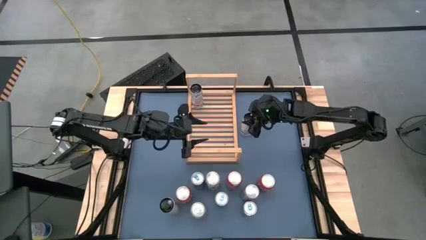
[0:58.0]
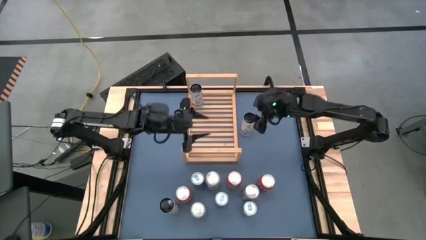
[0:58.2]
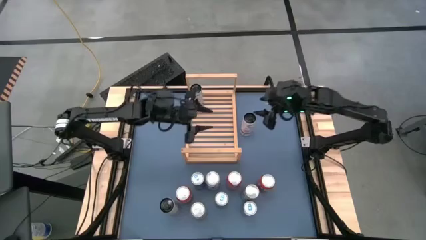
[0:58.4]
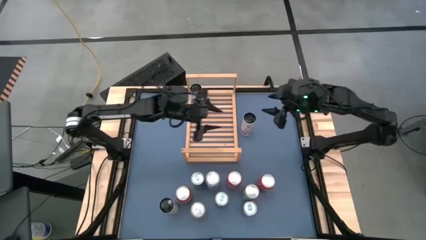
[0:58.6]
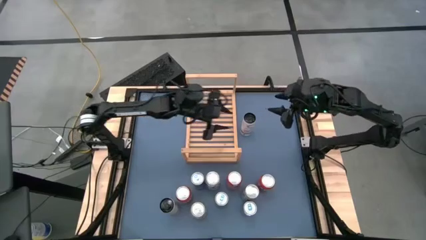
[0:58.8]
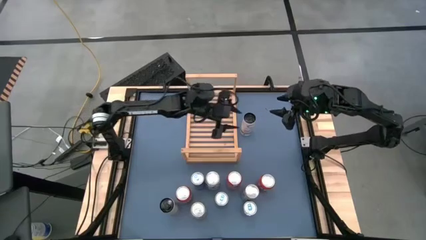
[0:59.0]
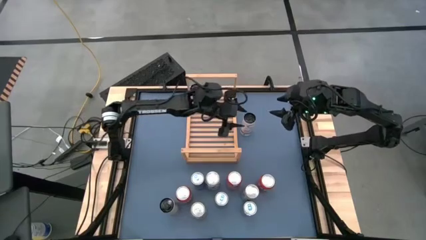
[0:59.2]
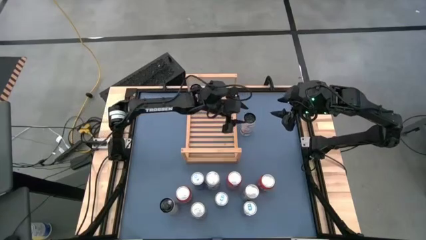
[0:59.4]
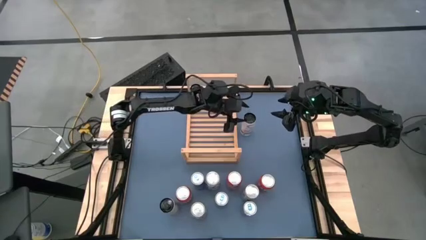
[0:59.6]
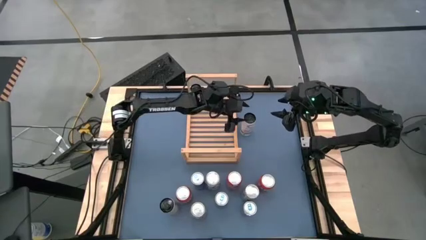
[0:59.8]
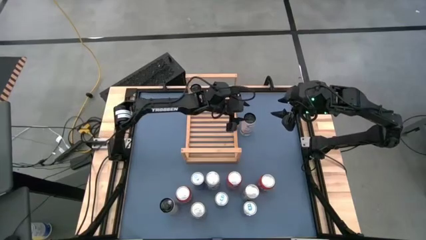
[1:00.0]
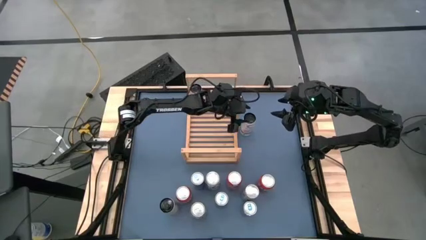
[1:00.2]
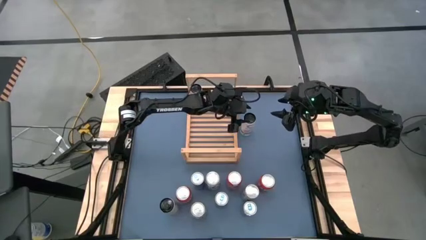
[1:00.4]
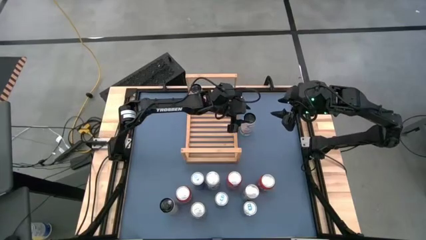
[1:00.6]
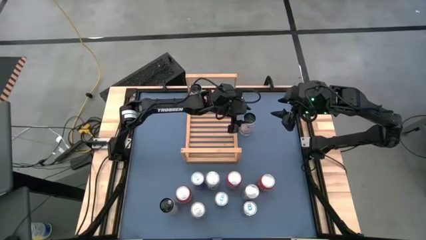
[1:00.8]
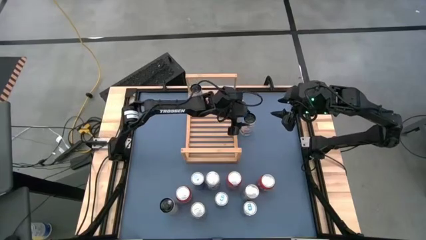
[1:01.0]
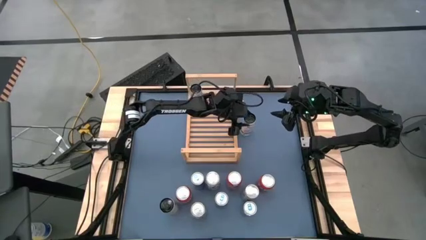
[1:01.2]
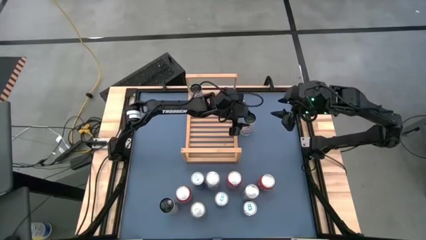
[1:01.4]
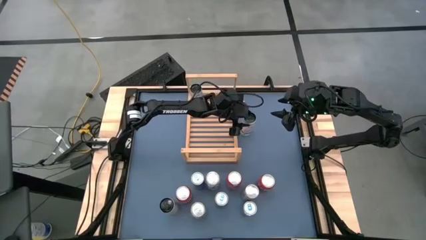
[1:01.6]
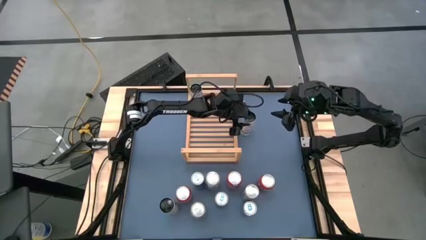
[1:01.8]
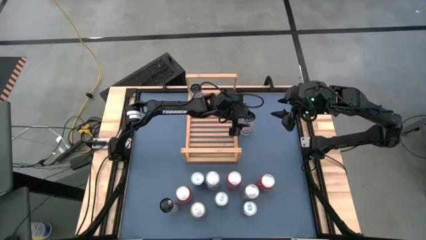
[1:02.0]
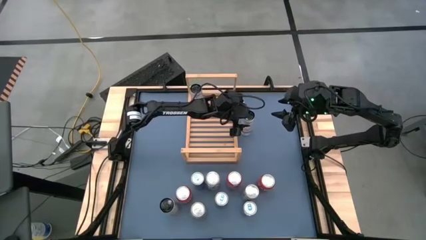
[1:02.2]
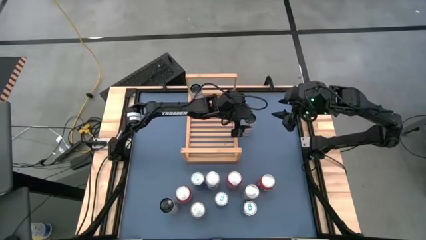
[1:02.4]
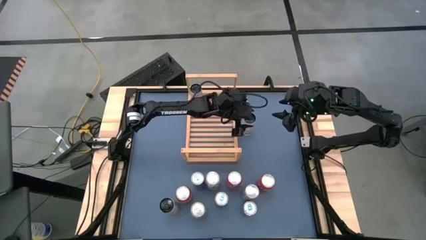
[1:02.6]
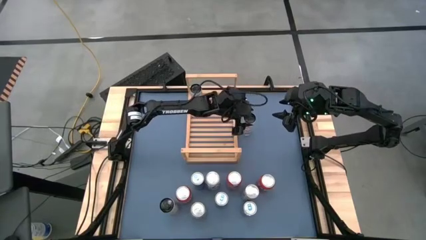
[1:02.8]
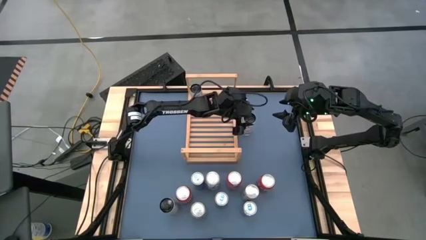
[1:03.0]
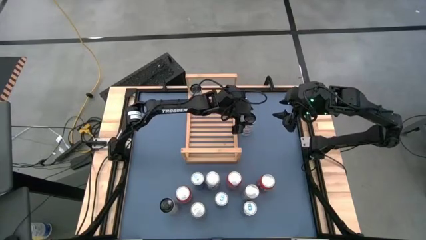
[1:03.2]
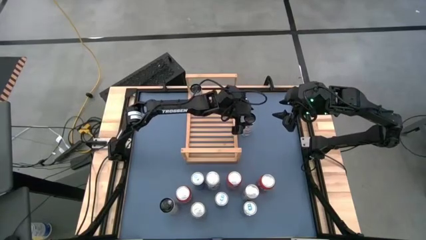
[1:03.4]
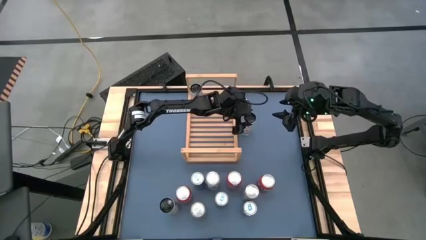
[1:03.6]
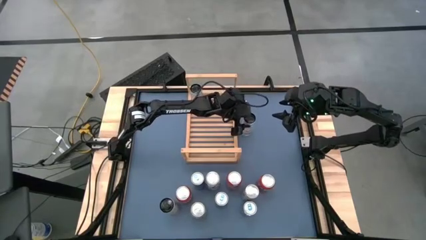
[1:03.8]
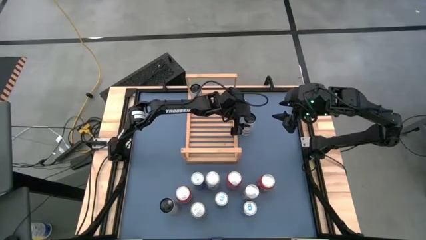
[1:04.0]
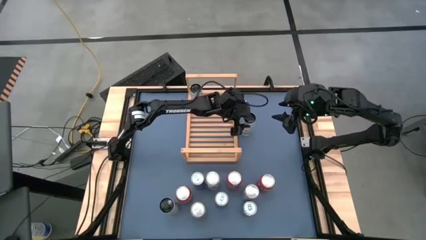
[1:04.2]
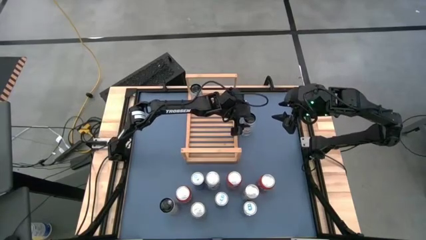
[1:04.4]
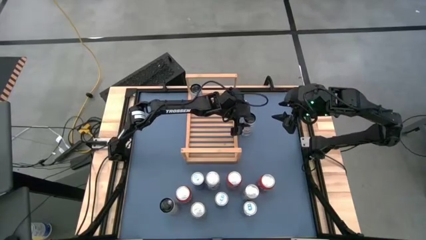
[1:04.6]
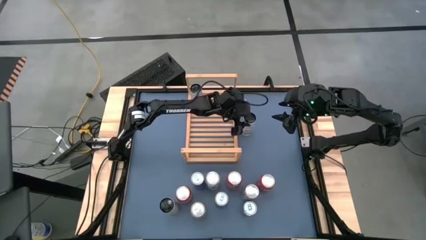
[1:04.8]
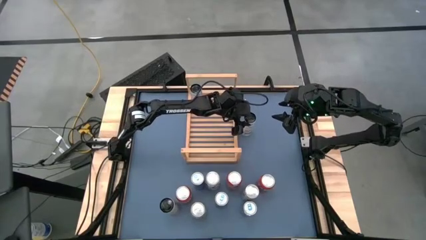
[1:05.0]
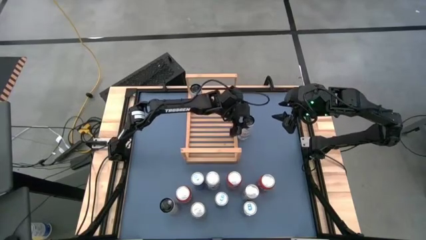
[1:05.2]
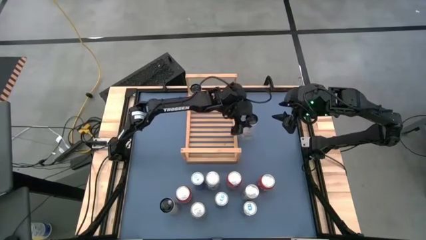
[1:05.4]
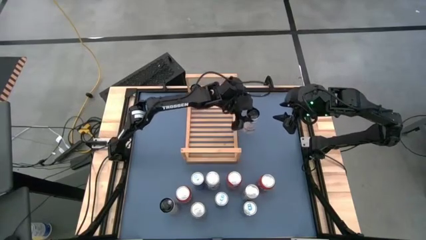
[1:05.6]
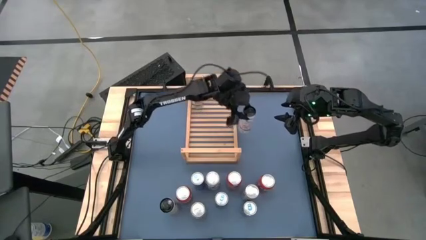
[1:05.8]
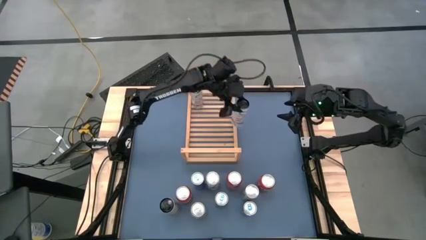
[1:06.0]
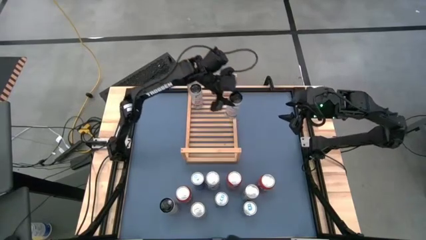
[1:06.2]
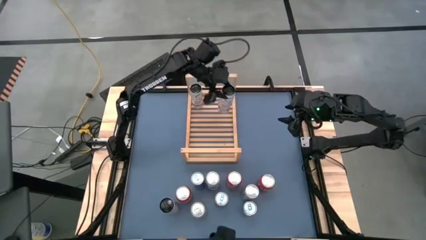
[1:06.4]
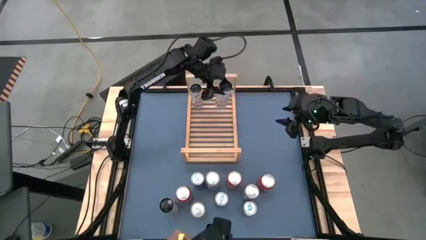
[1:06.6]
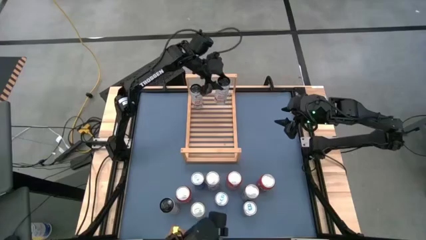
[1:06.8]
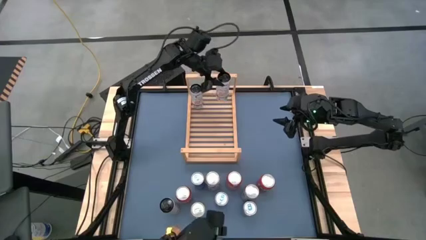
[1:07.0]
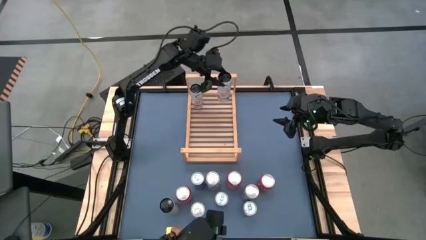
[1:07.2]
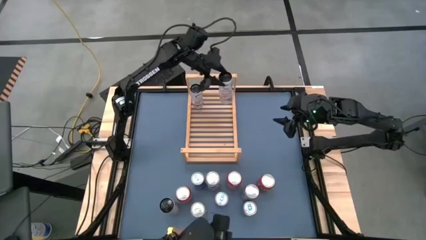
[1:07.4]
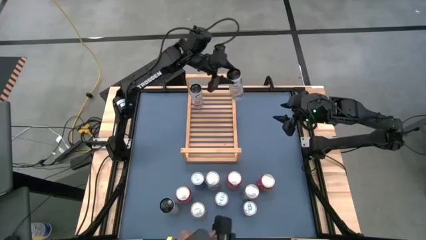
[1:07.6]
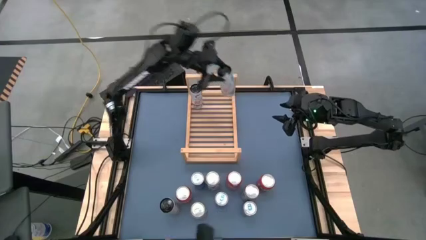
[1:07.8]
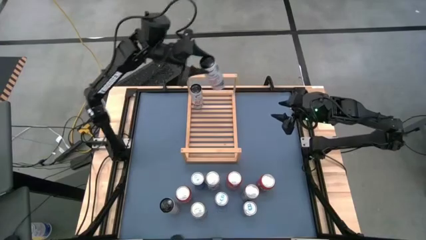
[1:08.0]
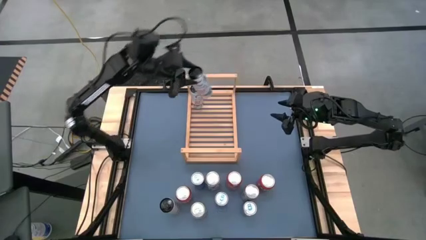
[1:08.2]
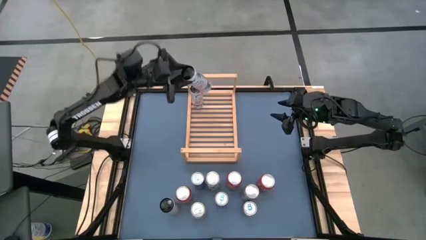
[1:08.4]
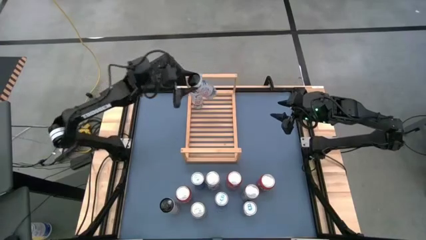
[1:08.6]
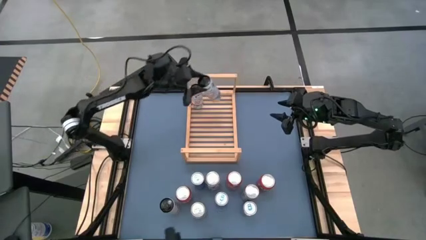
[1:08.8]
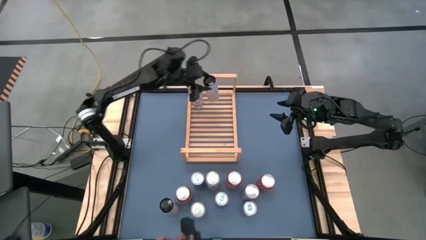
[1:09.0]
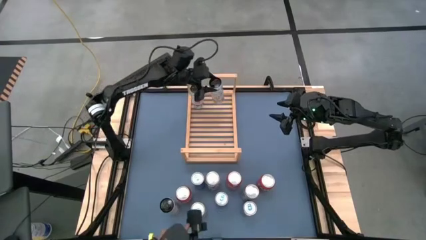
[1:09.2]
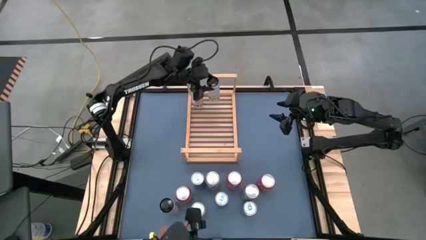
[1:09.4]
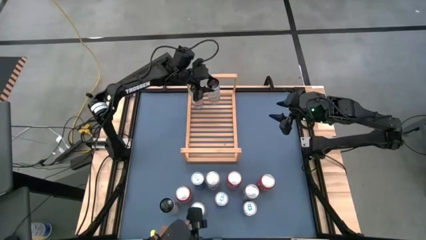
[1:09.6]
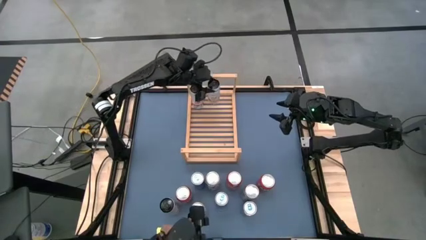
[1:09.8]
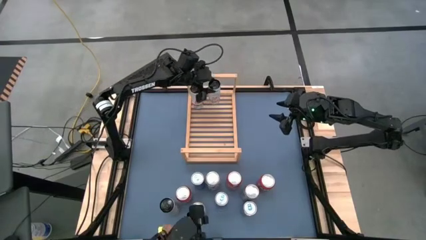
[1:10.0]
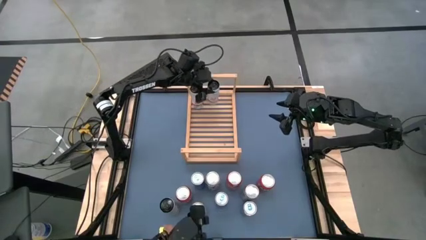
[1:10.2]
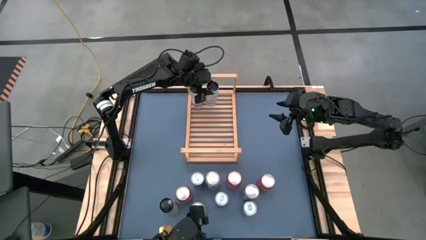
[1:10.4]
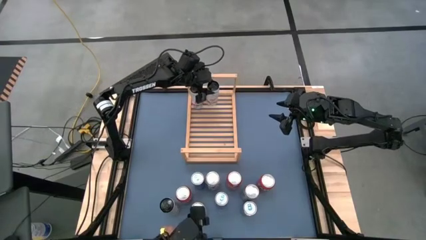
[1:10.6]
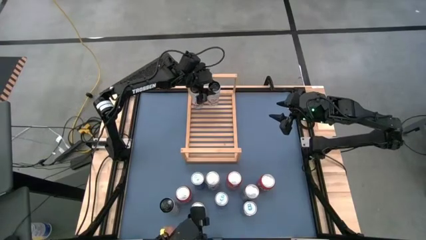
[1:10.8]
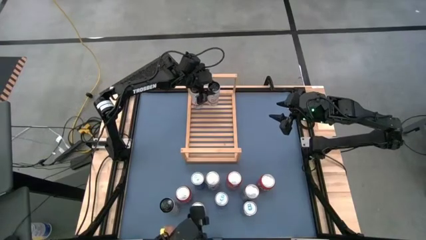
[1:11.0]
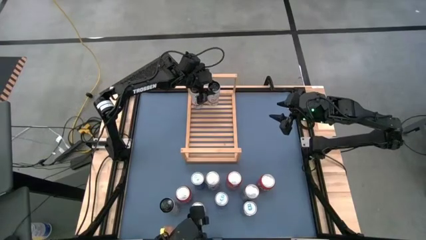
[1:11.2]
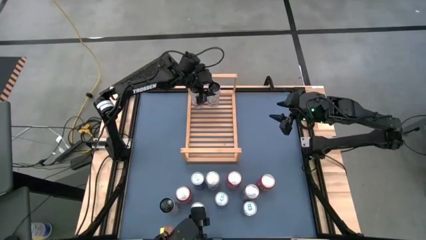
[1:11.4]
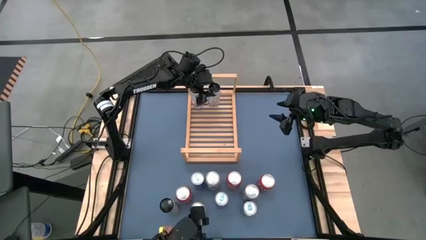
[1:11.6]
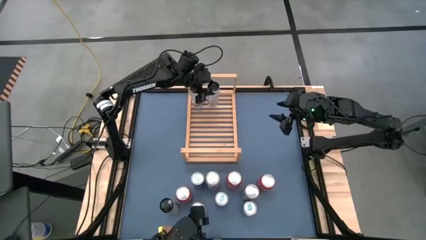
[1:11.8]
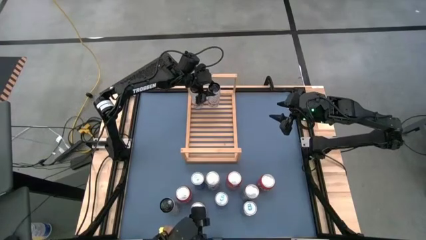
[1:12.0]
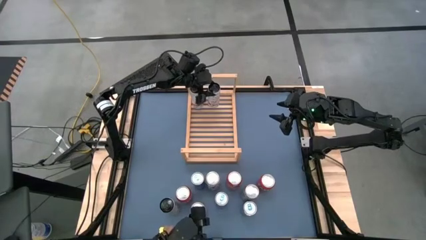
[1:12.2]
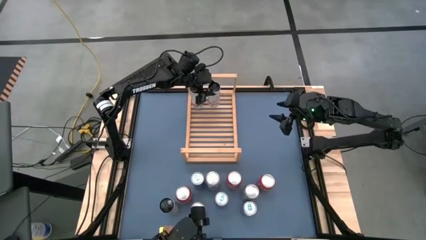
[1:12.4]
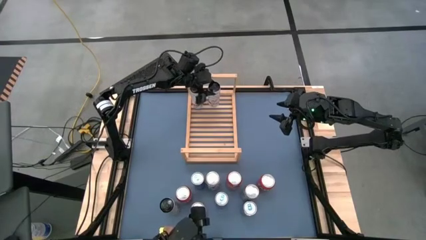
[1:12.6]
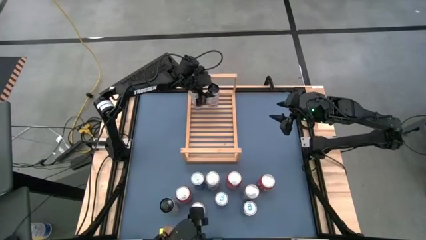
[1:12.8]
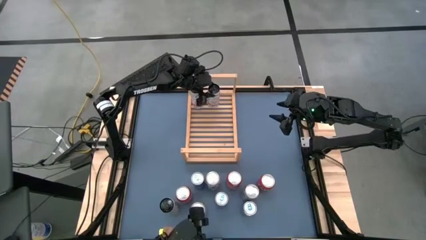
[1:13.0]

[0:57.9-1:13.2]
Task: Place canned beverage on shelf
Put the right white soda can on the shelf aligned with the other white soda can

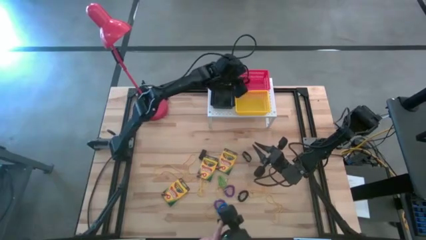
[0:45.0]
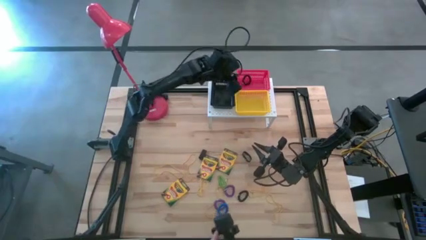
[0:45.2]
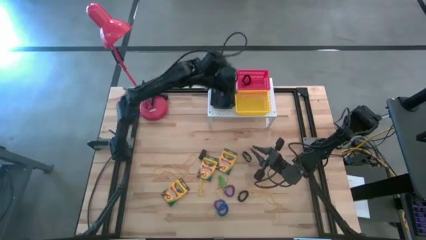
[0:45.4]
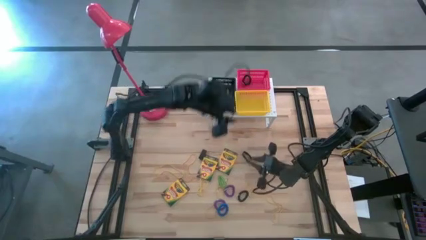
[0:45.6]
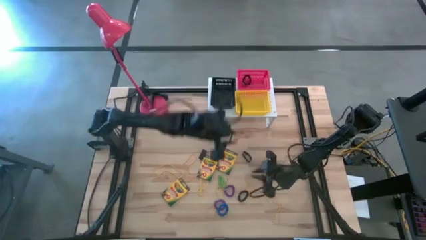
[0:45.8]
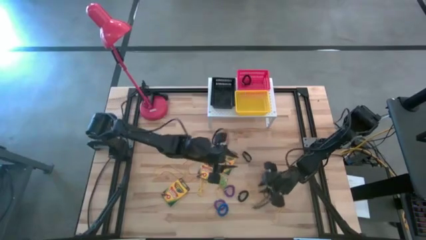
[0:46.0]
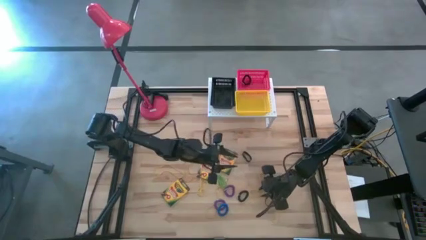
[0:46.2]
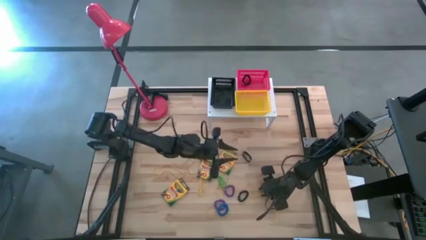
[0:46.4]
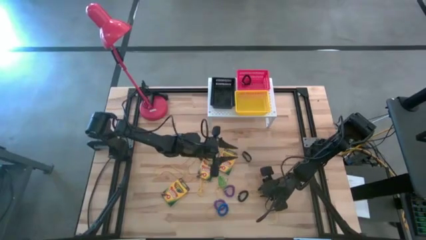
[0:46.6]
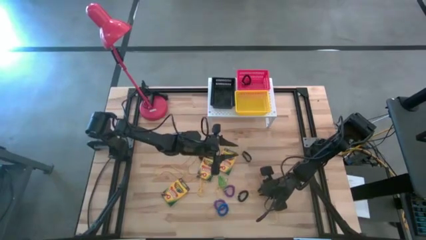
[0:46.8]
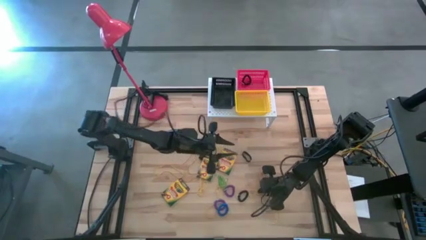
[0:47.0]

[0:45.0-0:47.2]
Task: Pick & Place Office Desk Supplies
Put the yellow rubber band into the black bin on the shelf
